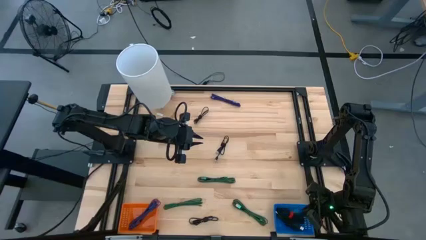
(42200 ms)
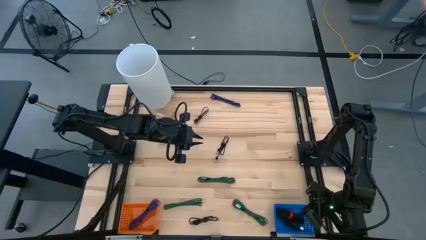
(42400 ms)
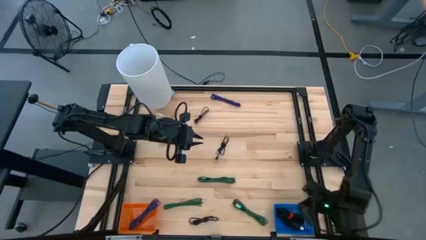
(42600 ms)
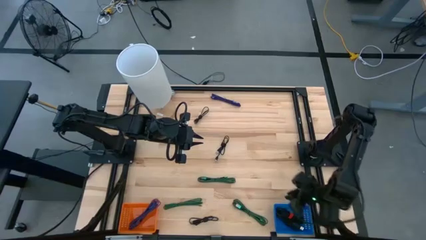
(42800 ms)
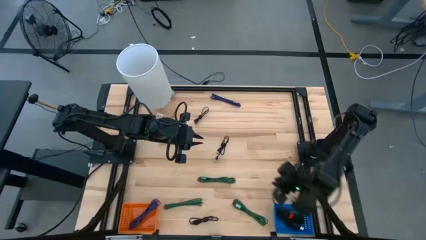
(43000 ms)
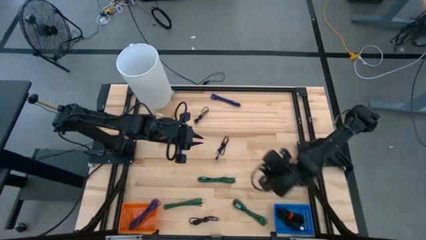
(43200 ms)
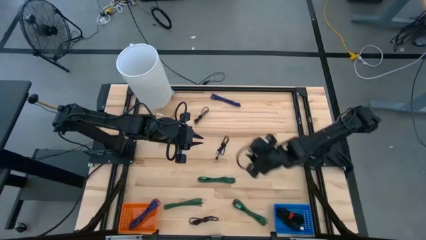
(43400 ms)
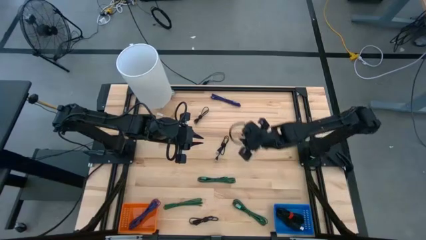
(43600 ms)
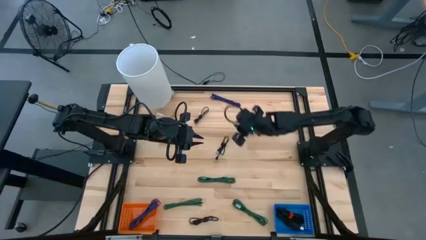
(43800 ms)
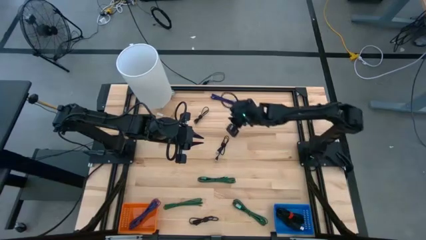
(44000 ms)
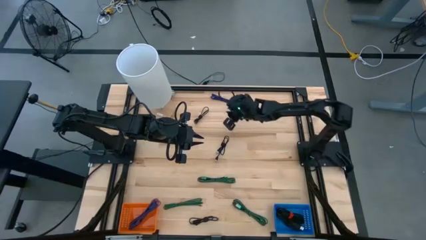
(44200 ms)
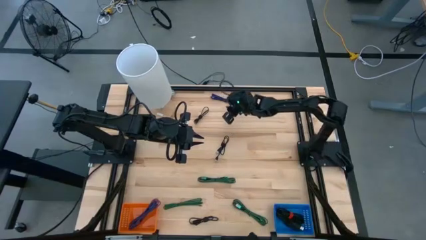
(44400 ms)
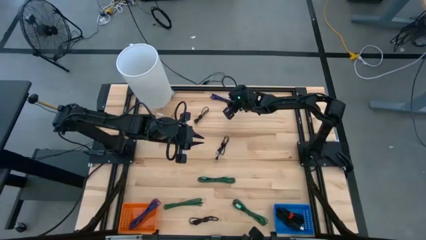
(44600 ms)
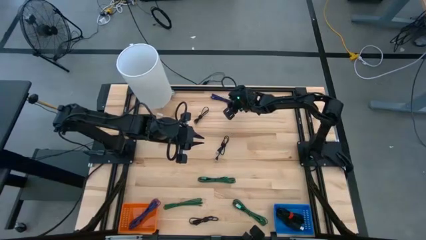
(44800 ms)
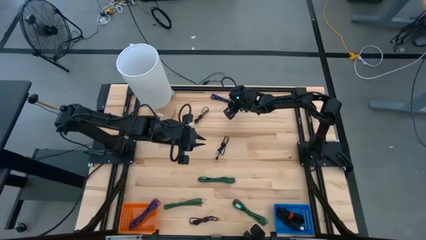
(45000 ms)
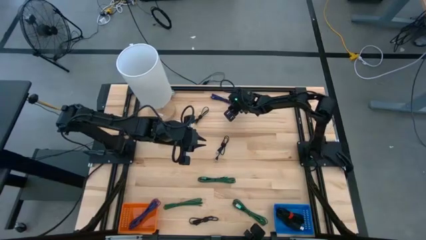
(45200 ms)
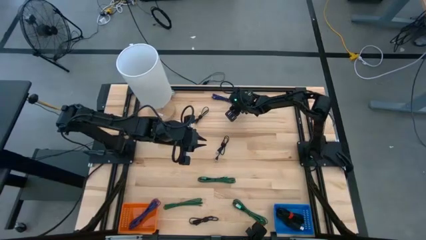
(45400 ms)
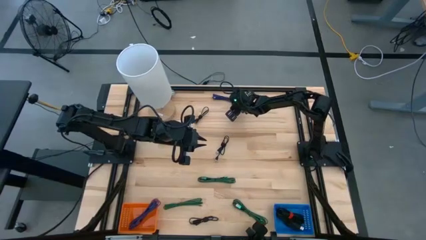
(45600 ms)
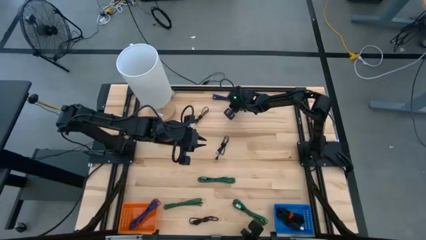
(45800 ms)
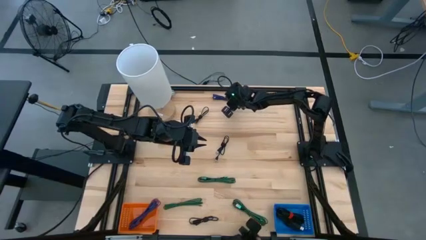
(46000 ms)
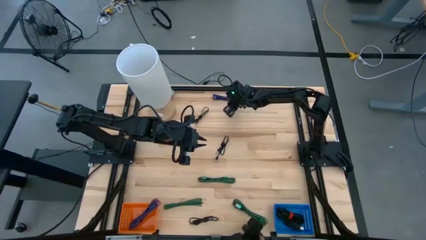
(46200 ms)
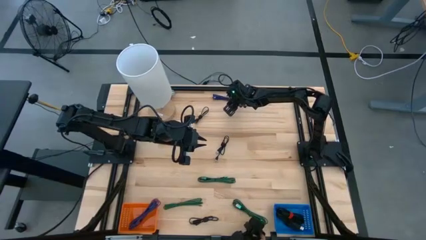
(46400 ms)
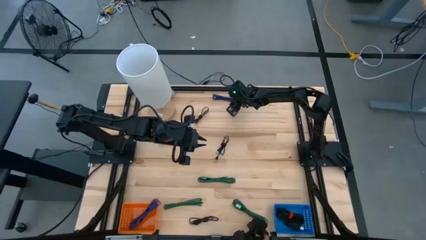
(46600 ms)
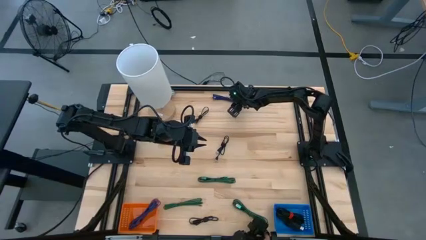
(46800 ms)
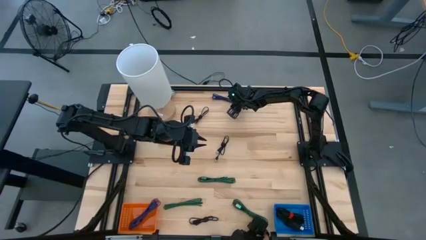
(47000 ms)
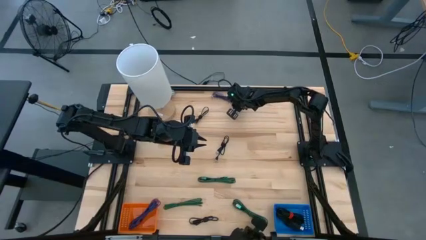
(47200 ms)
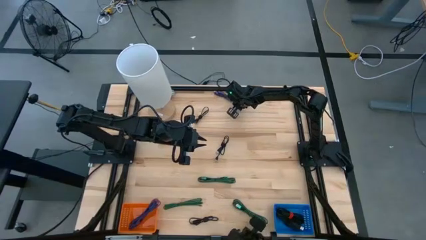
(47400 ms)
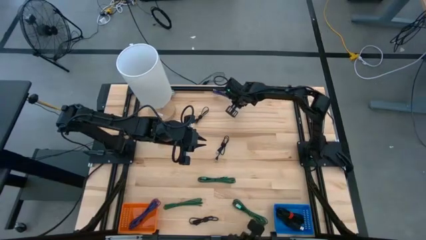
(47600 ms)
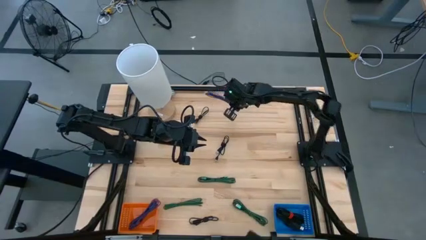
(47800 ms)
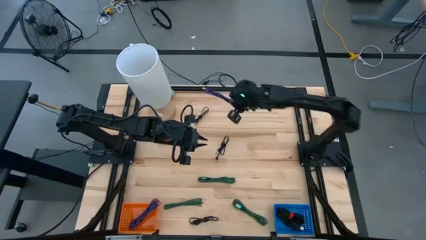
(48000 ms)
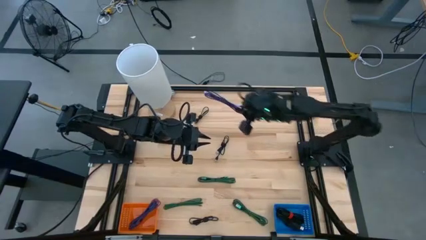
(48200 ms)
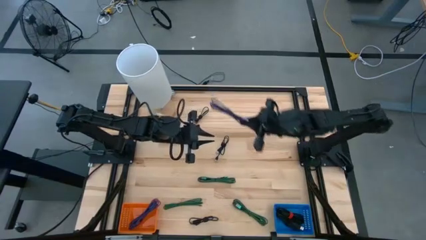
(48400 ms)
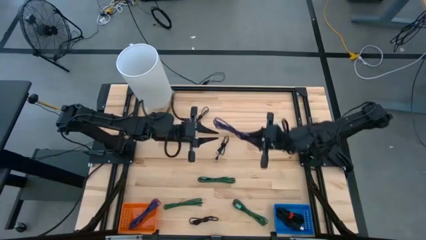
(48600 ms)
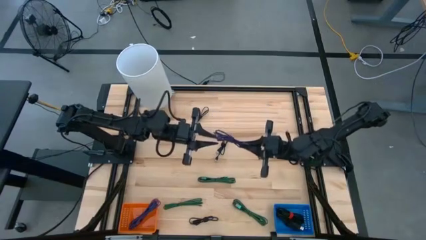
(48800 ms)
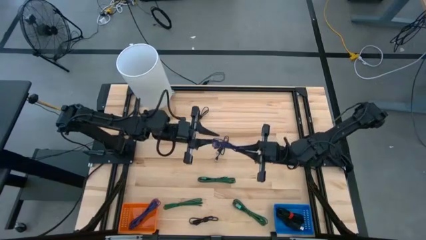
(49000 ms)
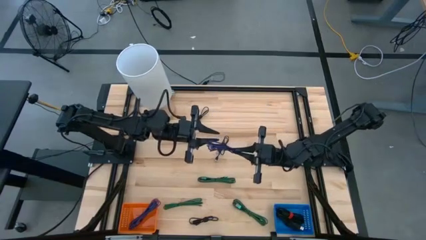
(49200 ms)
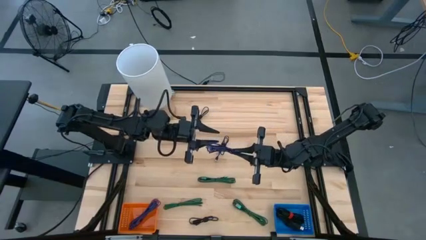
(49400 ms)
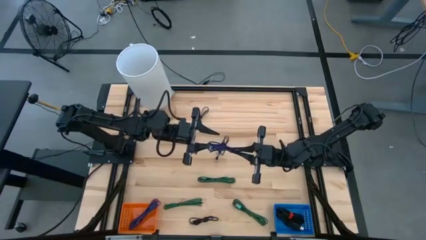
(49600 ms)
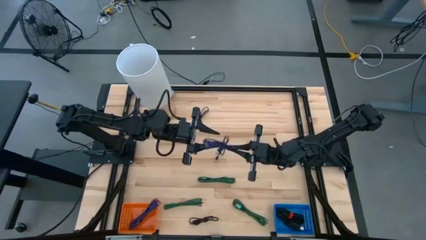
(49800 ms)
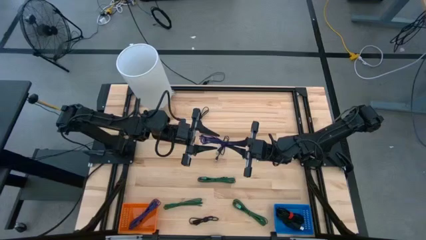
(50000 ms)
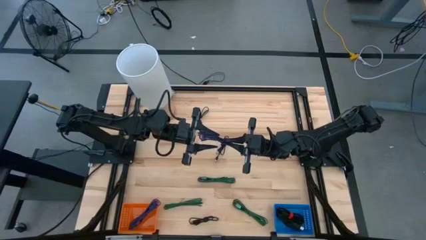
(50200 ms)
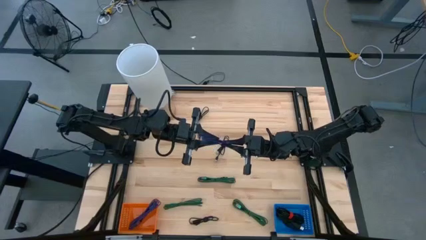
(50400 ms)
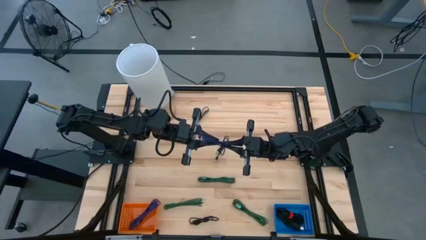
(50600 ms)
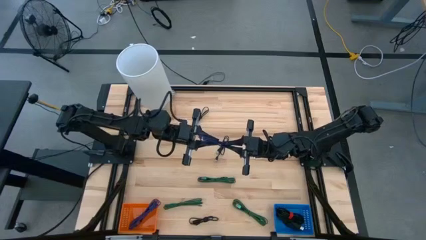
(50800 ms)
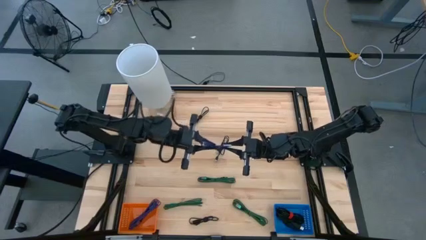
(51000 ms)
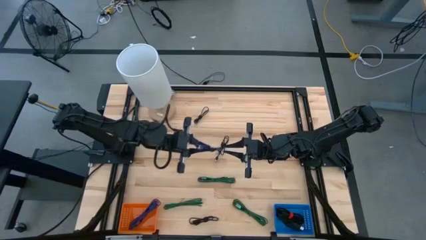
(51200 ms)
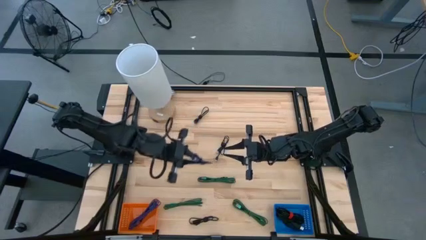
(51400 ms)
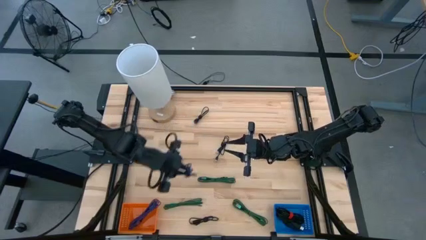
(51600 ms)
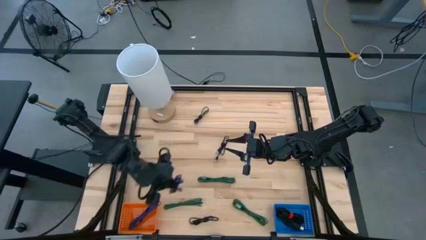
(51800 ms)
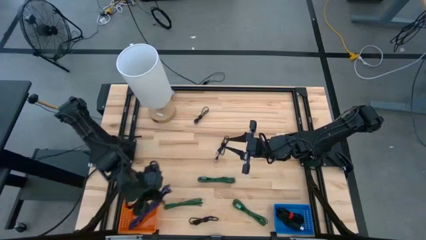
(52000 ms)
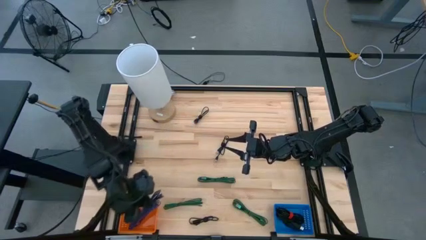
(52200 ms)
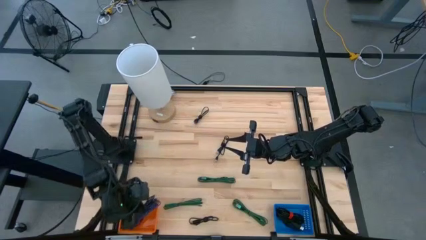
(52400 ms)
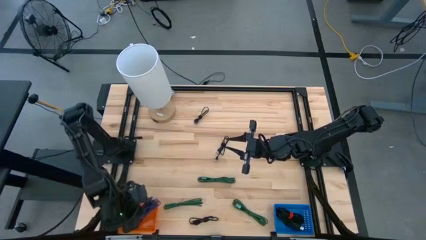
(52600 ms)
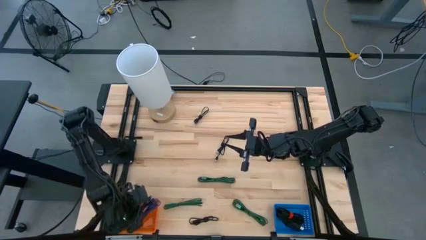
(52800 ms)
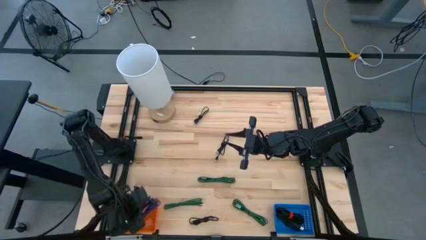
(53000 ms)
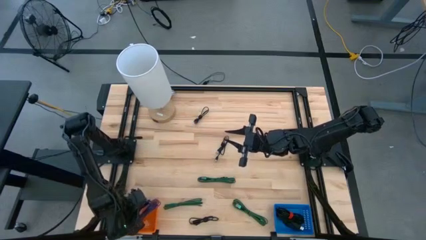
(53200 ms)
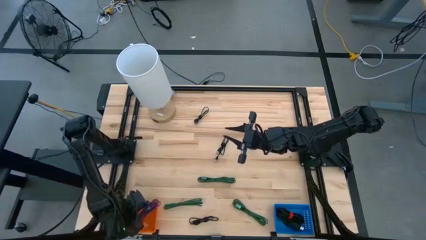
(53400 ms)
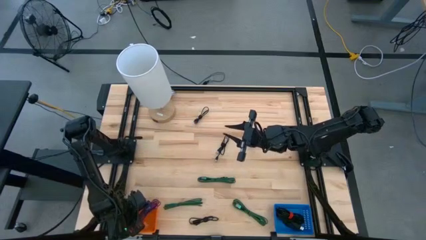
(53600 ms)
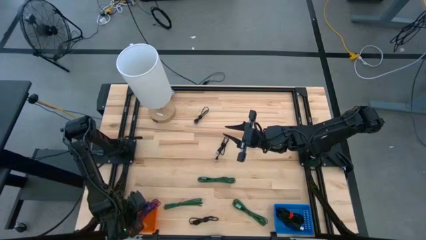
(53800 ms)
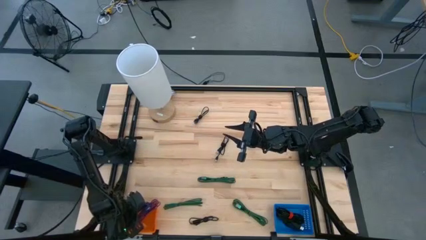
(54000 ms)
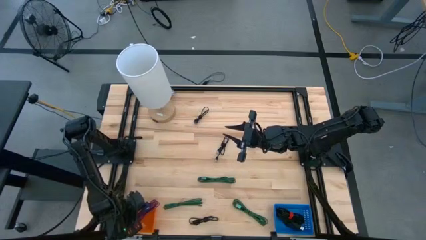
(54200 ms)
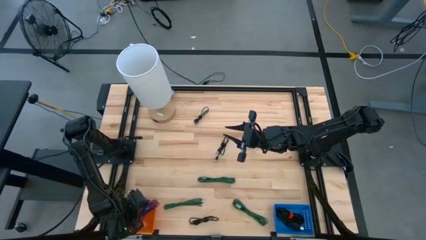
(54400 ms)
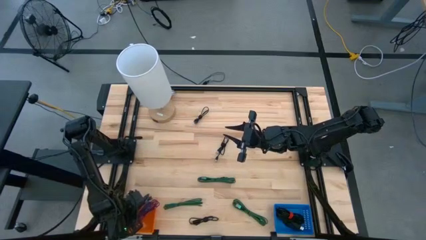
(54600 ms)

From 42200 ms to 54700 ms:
Task: Pick & Place USB Port
Put the blue patterned charger cable into the orange bin

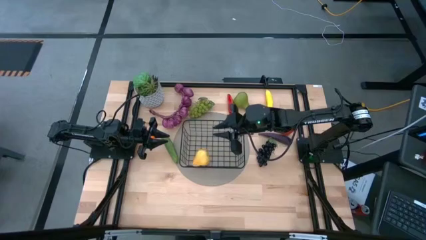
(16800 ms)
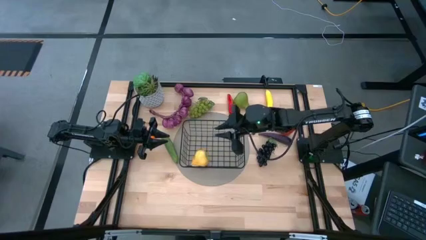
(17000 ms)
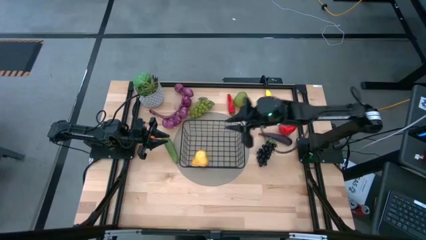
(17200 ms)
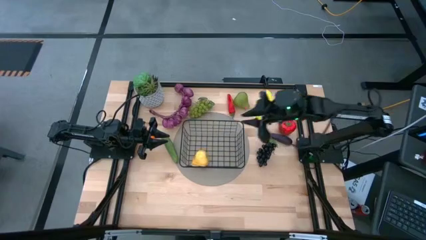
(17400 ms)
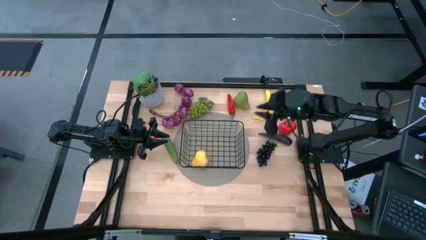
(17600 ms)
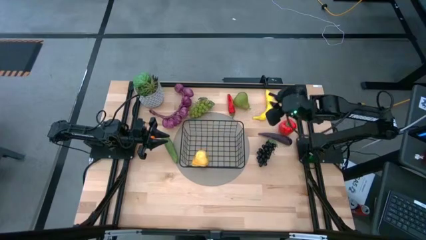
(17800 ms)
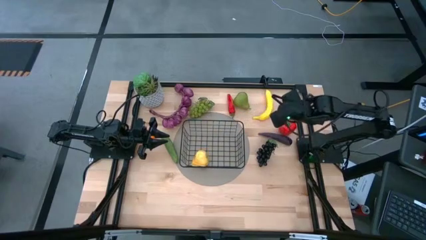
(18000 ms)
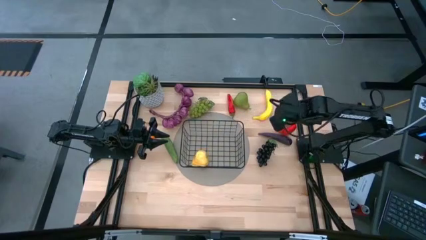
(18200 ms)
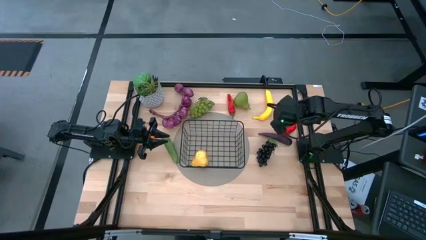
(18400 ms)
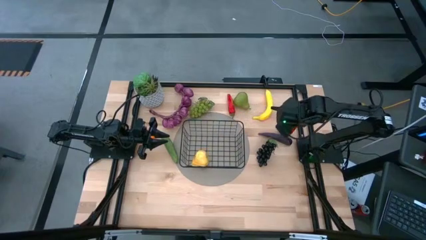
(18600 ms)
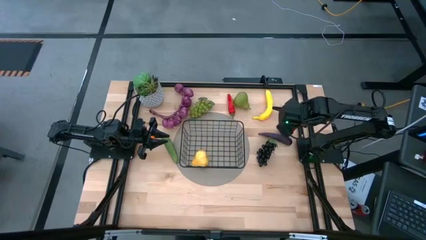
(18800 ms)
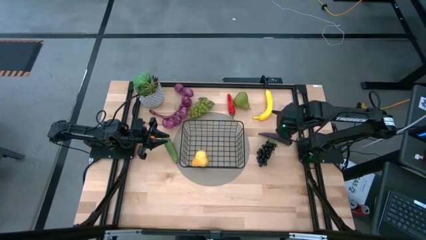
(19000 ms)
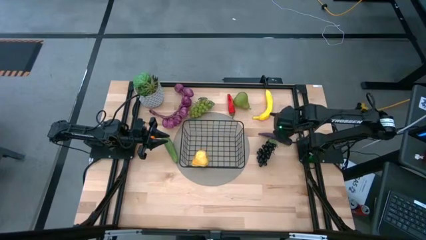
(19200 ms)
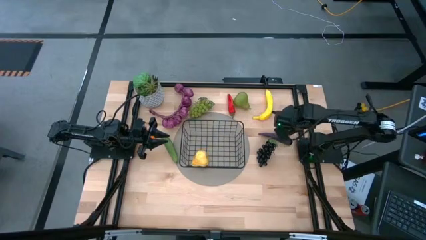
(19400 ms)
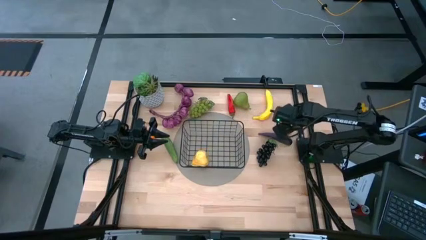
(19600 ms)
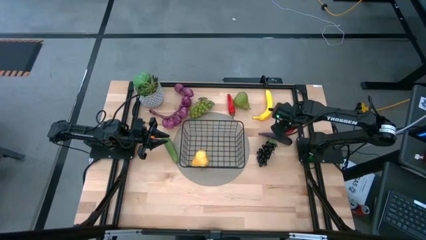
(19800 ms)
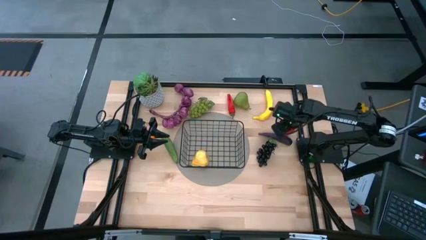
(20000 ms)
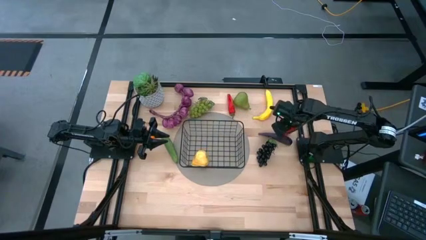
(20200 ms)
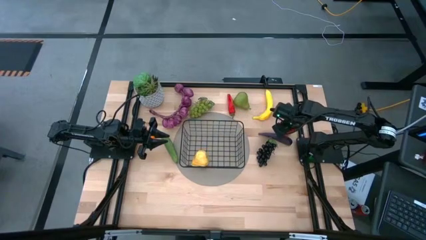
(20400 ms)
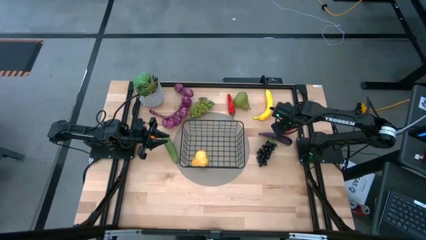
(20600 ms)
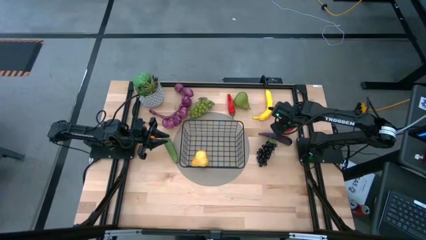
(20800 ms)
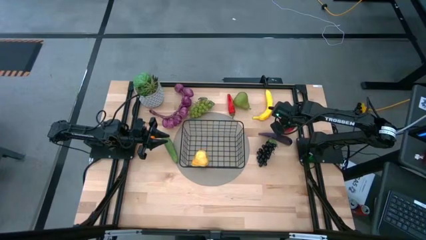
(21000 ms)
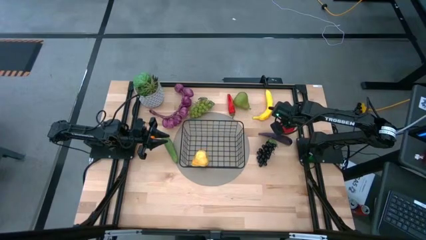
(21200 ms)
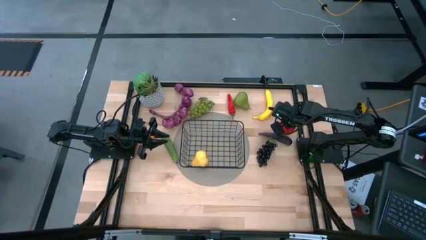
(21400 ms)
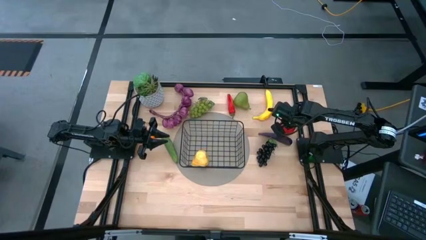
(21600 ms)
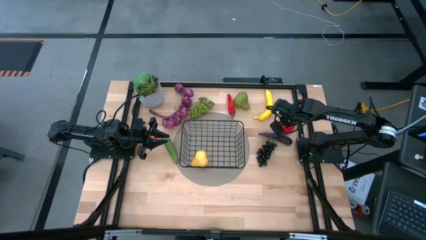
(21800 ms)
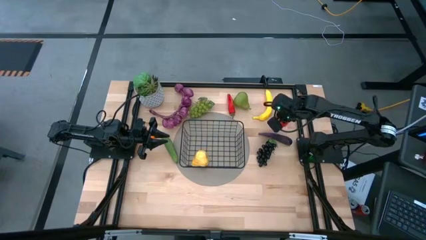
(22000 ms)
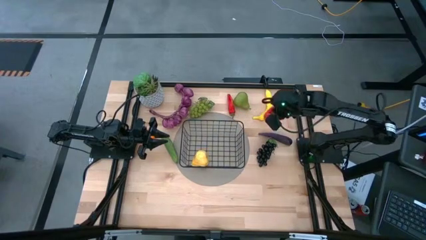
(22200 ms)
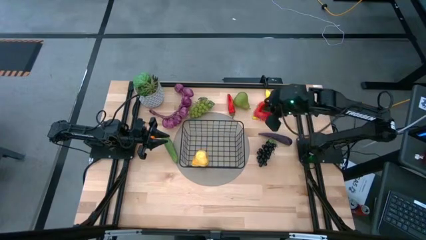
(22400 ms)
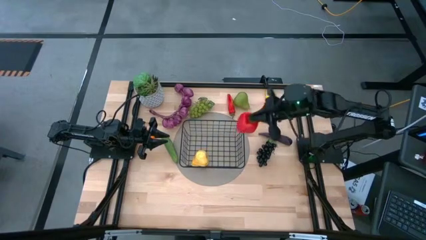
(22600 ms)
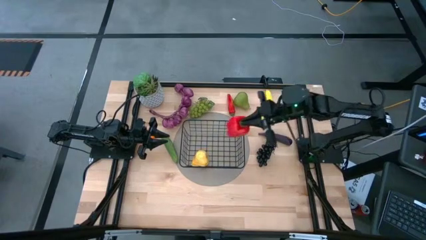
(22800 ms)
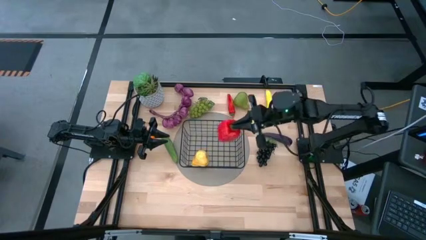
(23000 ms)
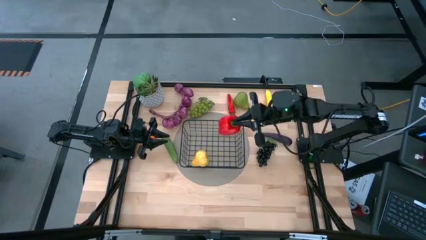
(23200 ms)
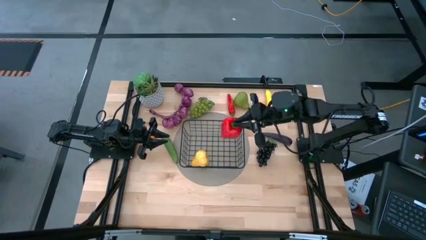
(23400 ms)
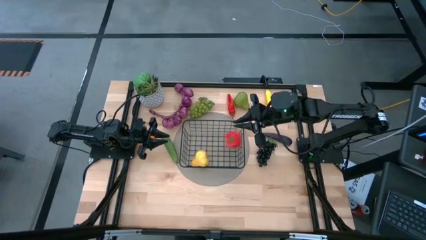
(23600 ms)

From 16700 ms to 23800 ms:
Task: Build produce basket
Put the red bell pepper into the black wire basket
